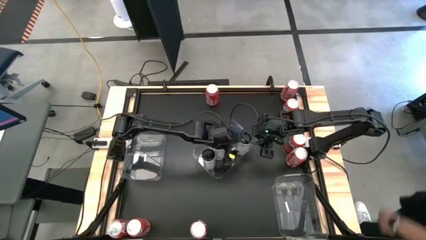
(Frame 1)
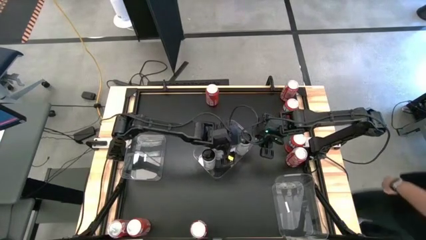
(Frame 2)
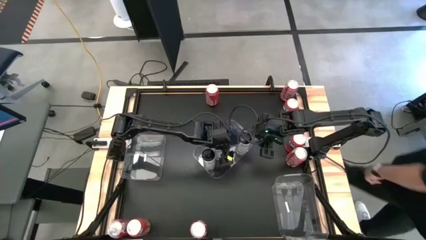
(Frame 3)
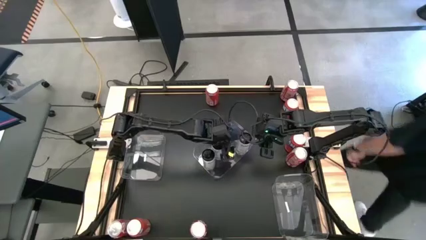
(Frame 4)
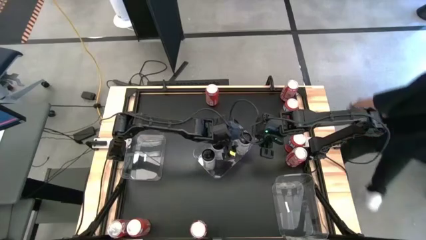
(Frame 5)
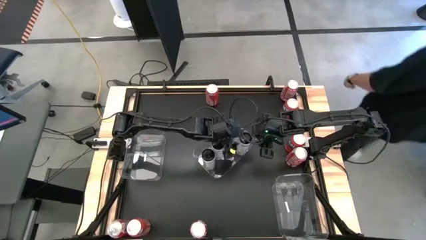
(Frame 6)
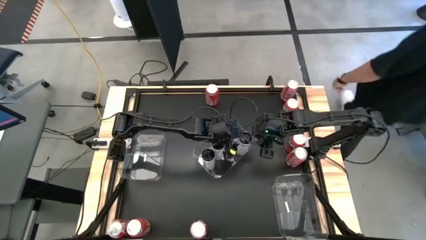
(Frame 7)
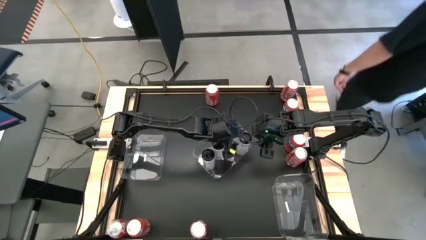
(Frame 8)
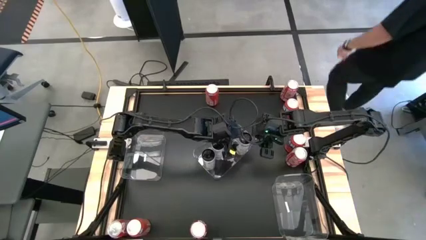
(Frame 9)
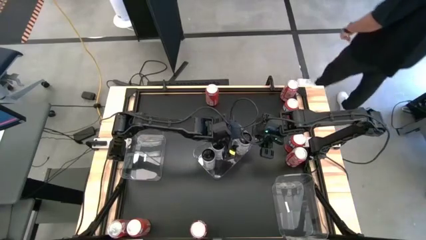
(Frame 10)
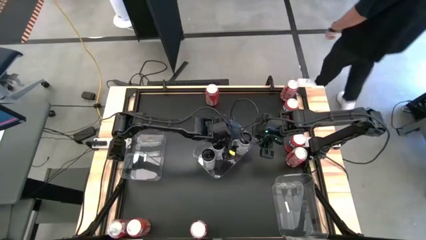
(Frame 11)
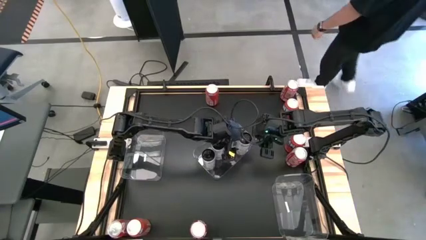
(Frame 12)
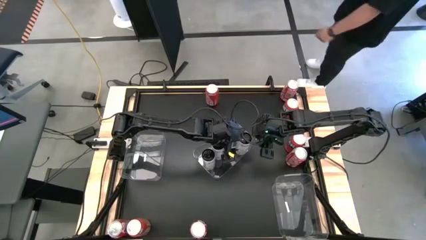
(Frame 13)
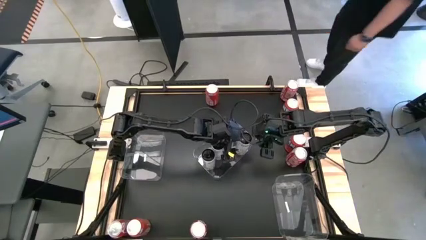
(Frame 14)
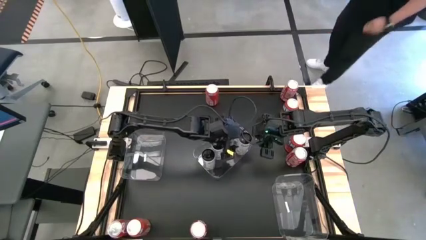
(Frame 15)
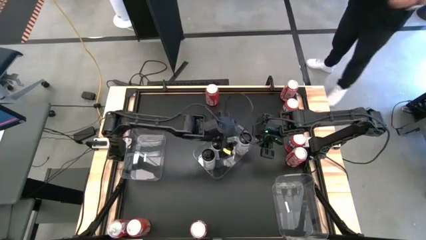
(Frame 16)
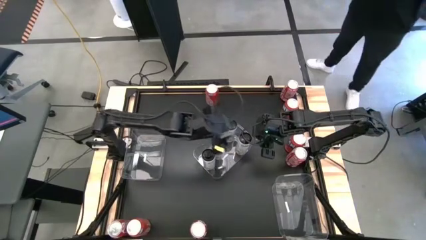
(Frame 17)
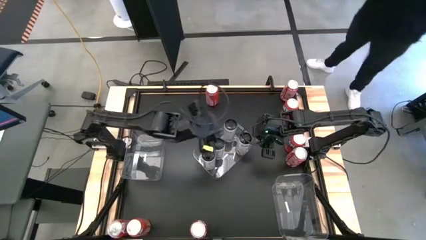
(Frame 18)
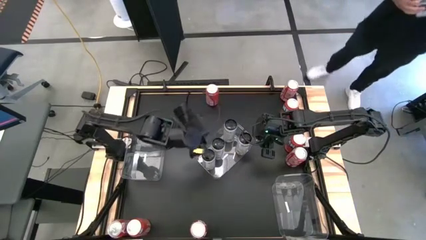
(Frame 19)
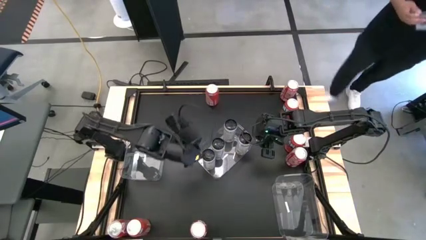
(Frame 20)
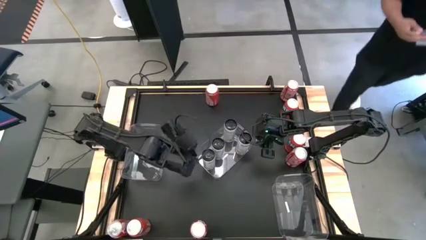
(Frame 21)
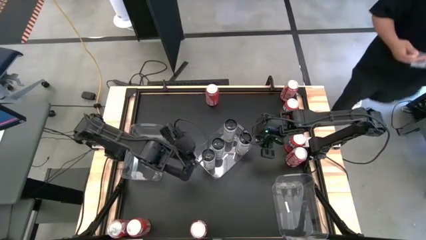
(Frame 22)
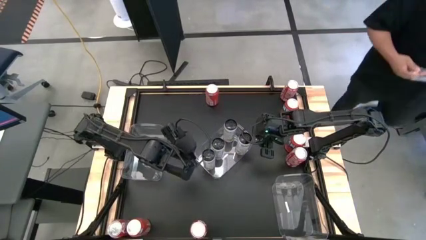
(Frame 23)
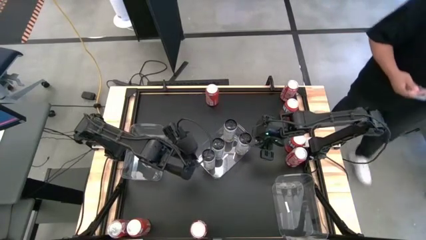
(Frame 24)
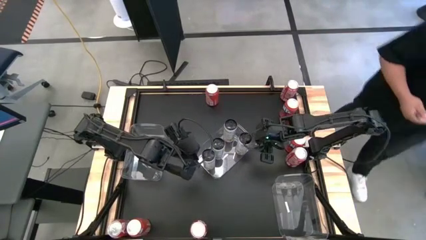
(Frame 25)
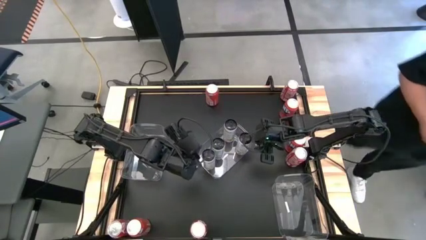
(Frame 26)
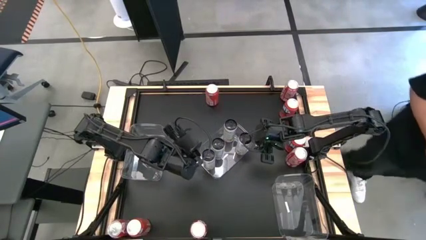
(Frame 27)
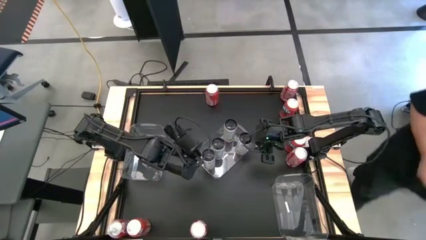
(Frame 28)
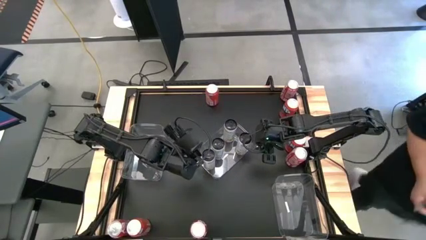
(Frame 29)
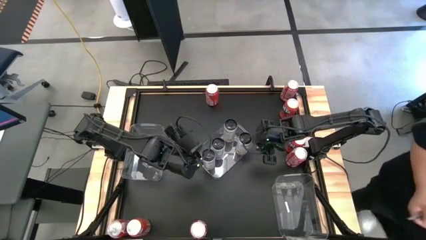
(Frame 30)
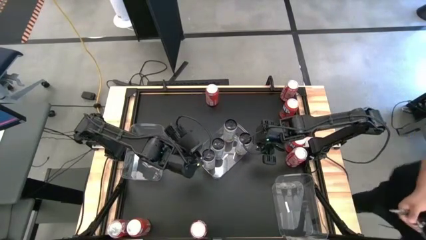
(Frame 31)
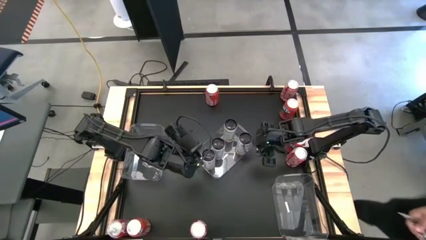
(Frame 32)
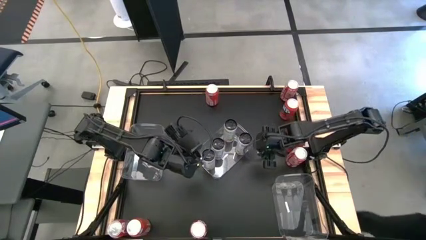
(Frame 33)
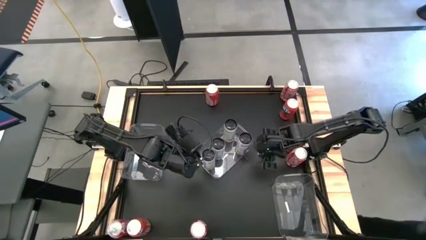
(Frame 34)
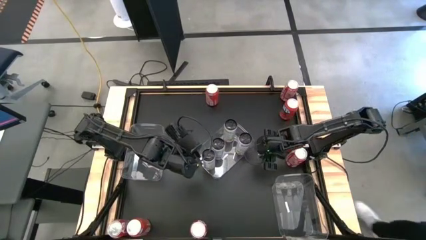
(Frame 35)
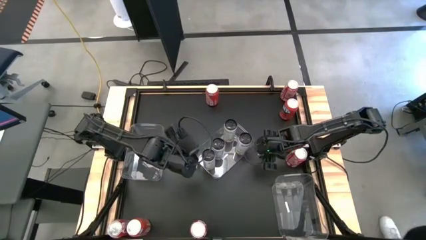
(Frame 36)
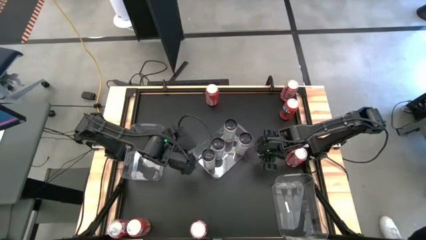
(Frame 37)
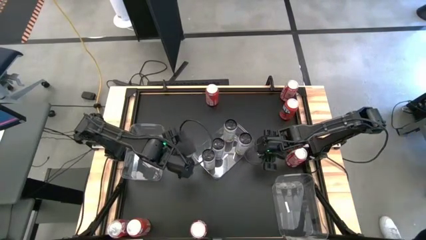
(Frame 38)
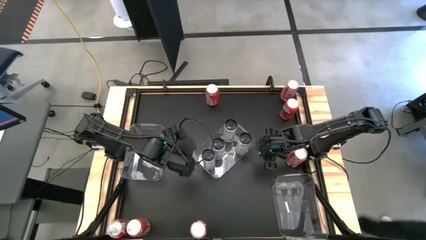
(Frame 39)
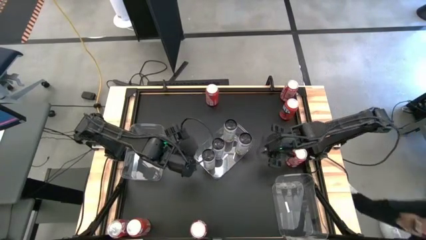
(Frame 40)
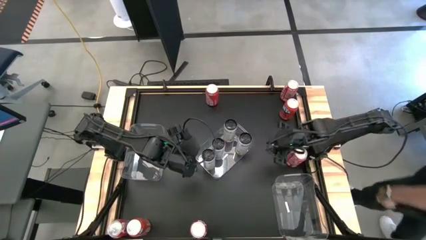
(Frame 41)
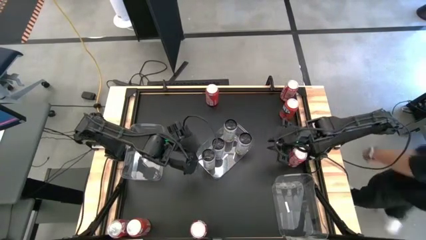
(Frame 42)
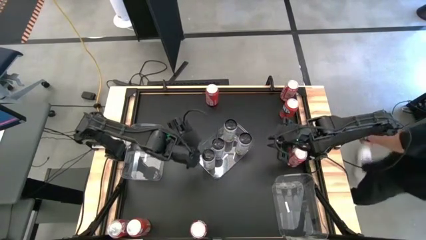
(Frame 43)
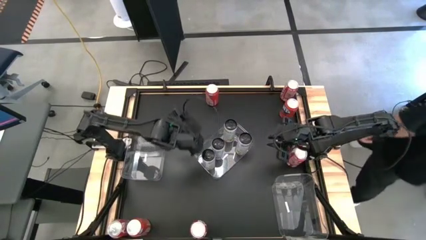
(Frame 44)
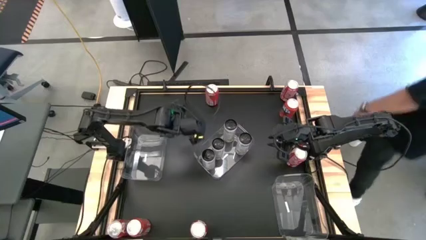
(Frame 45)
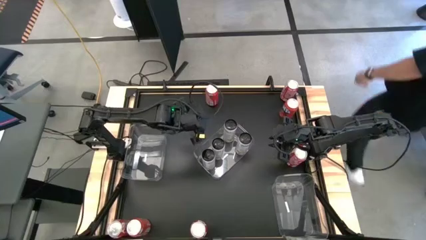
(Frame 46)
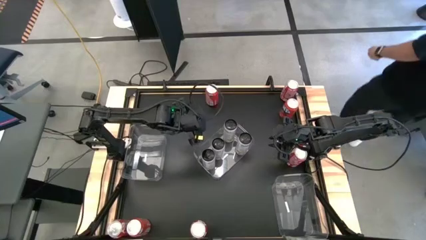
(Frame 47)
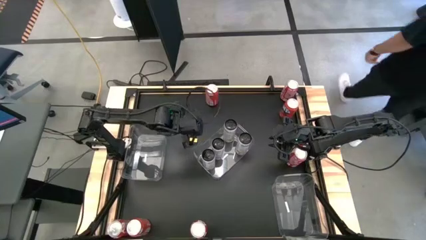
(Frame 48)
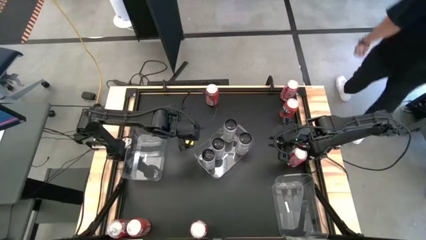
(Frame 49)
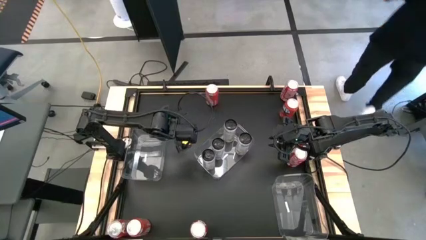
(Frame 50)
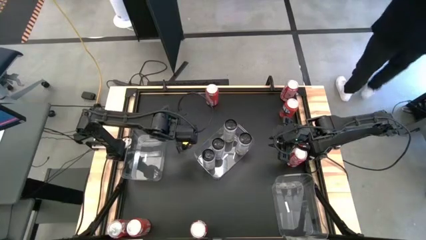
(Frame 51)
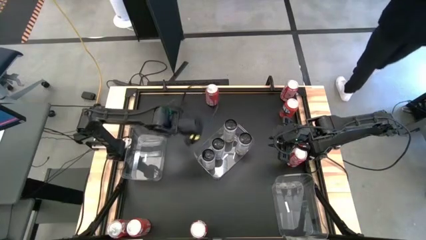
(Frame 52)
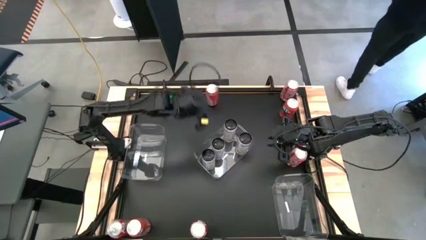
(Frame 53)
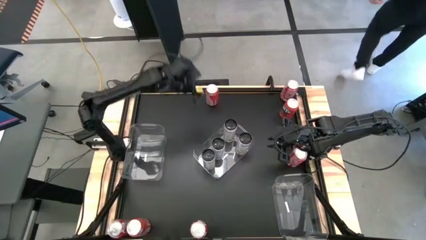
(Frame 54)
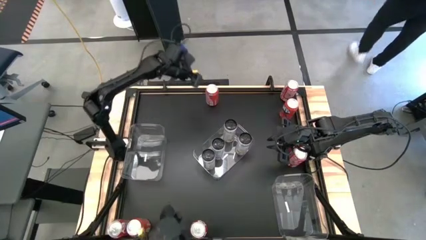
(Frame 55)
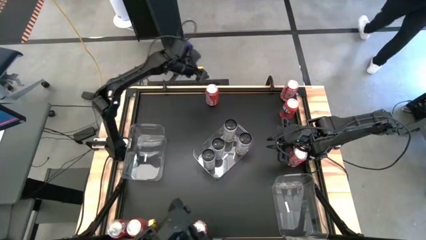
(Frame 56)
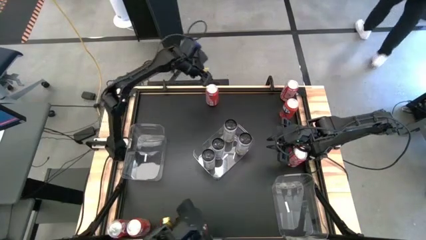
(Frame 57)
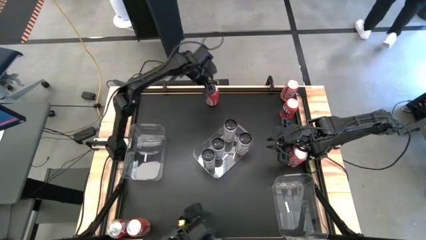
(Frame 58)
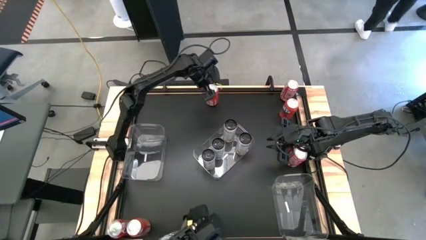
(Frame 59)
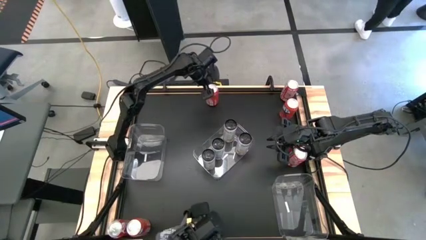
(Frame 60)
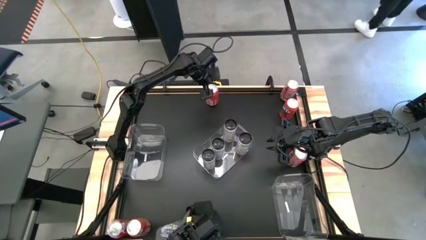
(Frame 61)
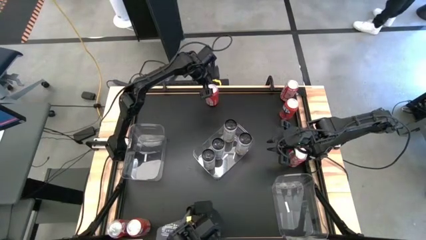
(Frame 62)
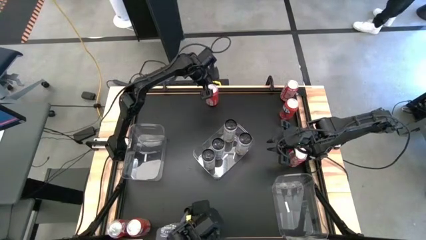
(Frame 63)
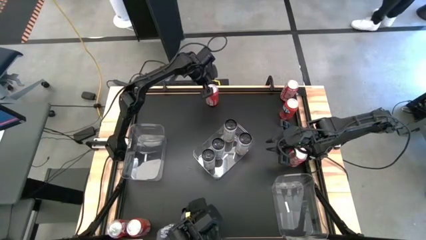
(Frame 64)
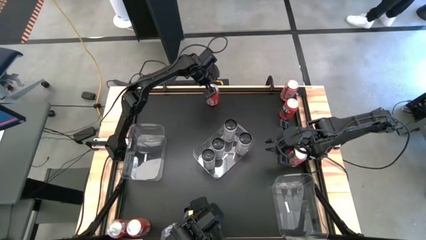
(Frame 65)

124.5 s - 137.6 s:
Task: Sort soda cans
Put the orange soda can into the left transparent bin

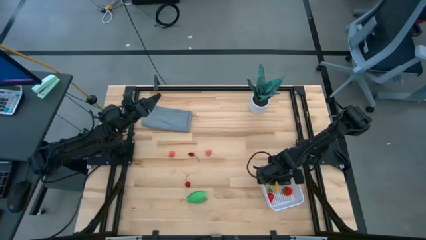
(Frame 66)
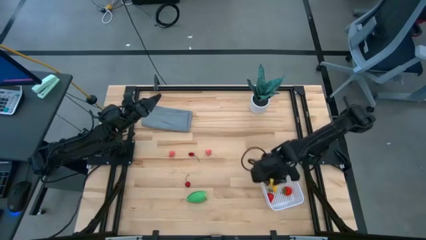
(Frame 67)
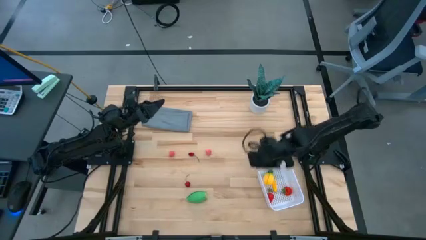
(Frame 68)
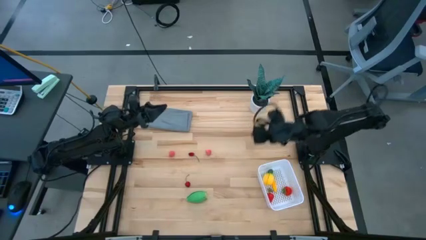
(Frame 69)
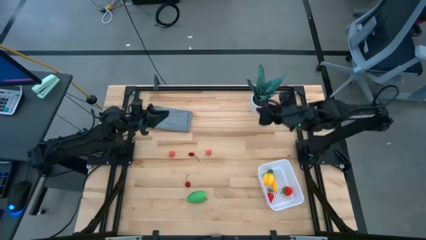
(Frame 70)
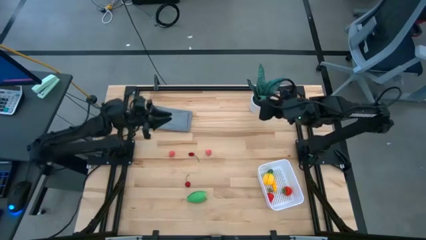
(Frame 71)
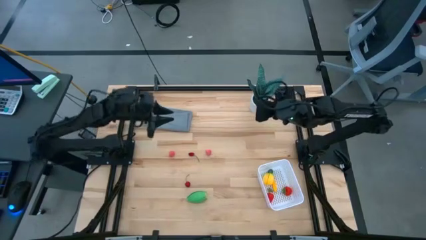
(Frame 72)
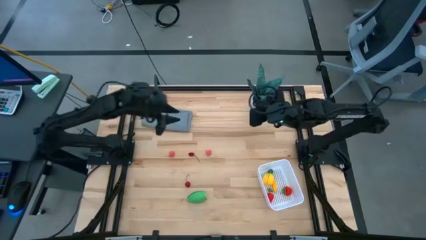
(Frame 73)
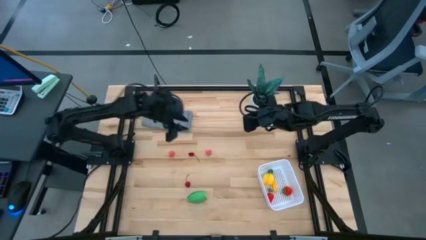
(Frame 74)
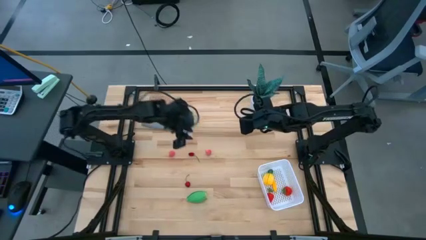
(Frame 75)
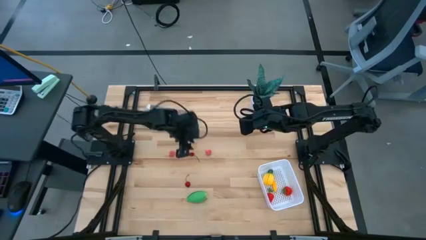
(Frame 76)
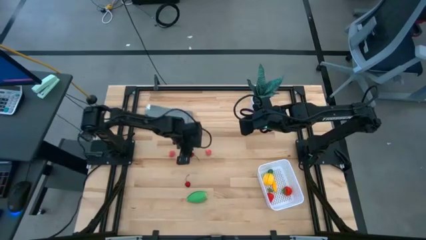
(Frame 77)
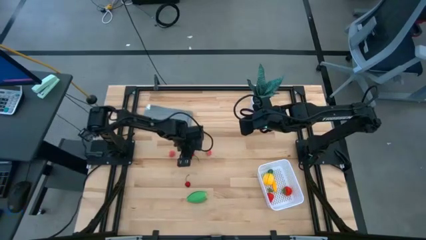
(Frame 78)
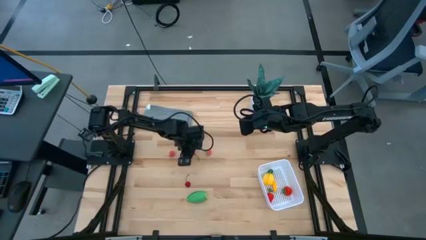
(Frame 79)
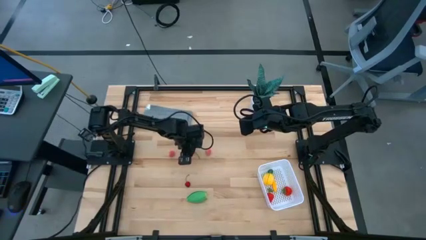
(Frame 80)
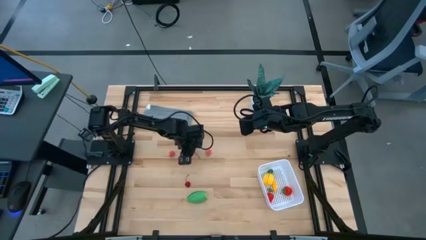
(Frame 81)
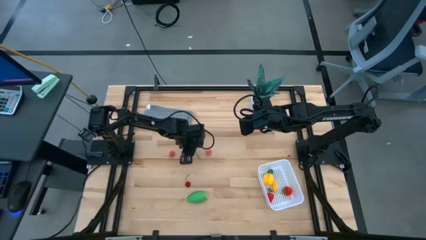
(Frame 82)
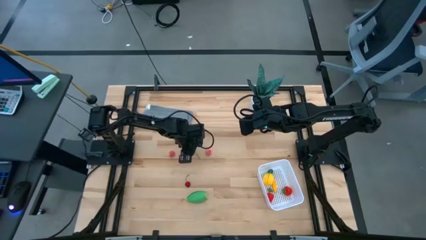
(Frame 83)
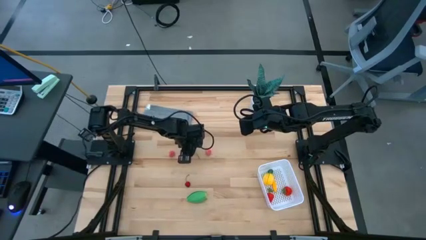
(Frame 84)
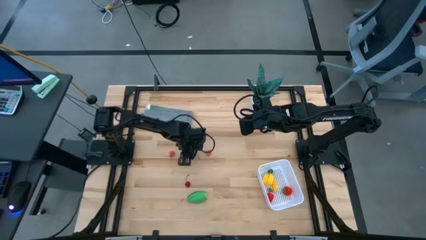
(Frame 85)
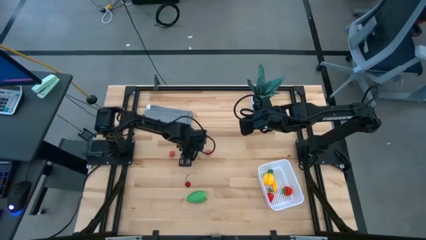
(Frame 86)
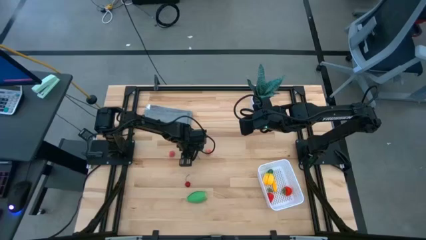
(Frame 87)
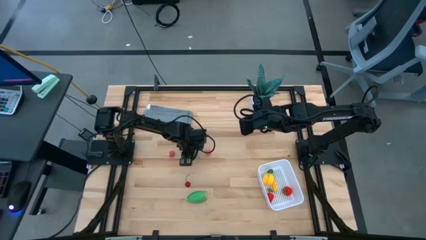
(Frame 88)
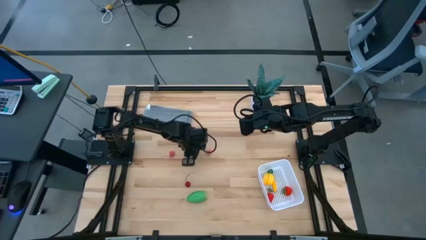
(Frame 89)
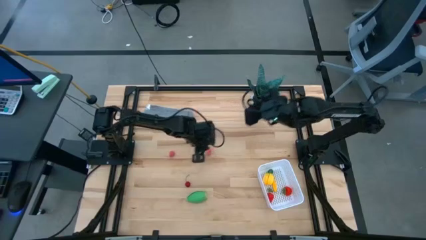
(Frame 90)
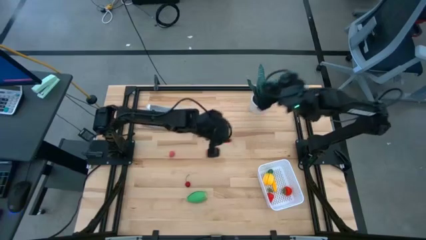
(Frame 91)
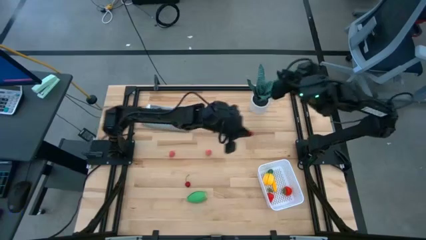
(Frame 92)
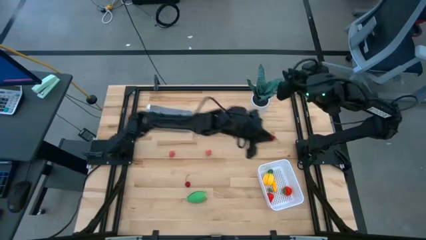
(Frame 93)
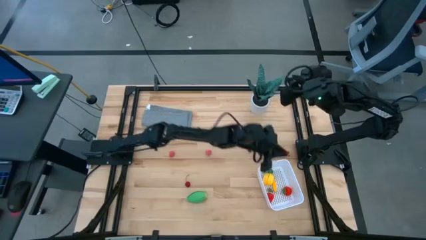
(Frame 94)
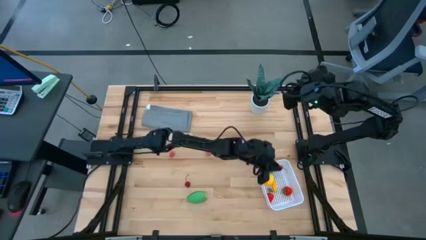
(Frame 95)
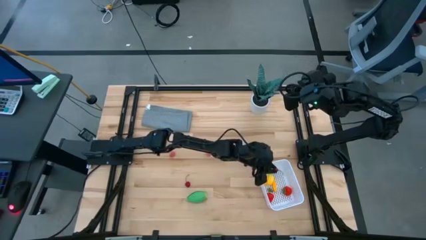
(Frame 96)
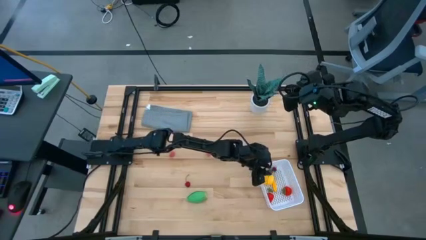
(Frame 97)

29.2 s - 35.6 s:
Task: Pick and placing Produce into tupperware
Put the top cherry into the white bin
